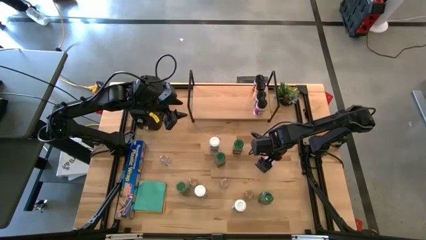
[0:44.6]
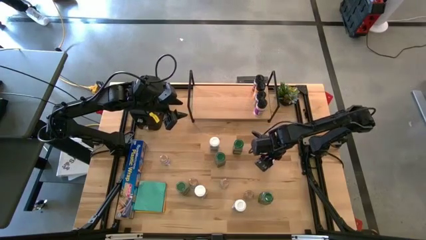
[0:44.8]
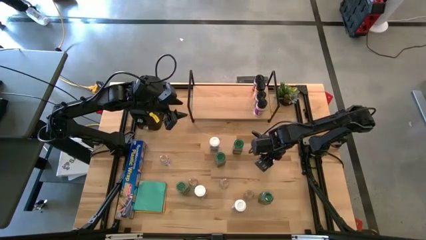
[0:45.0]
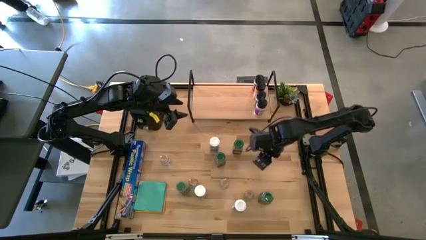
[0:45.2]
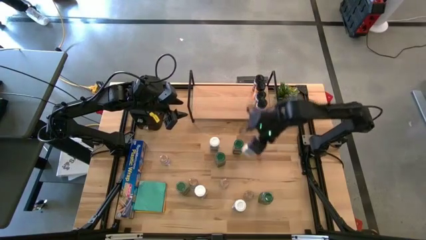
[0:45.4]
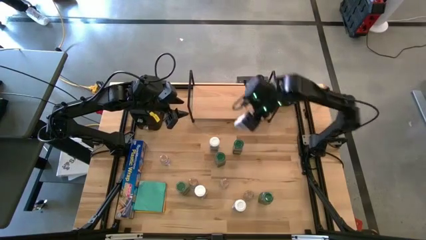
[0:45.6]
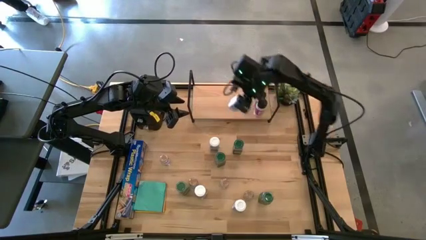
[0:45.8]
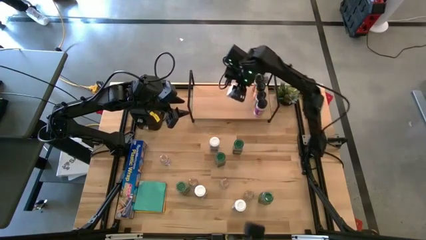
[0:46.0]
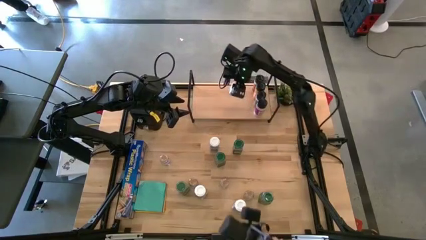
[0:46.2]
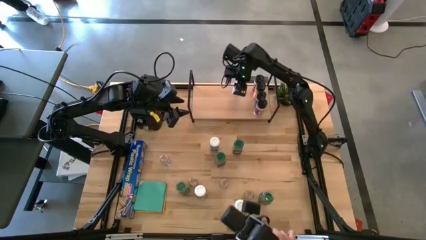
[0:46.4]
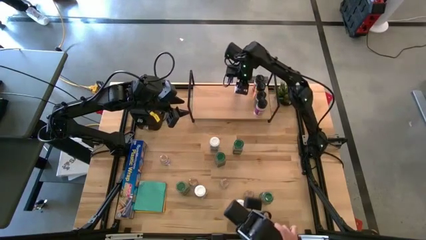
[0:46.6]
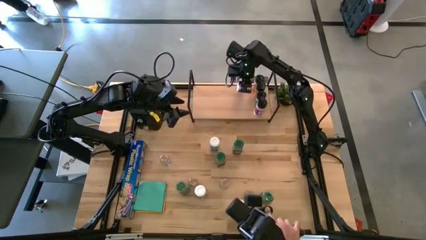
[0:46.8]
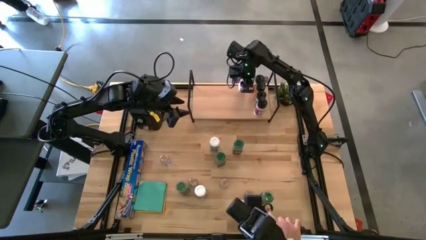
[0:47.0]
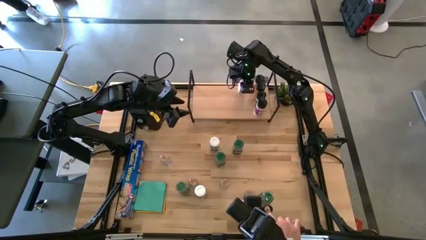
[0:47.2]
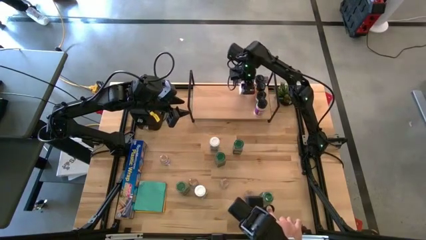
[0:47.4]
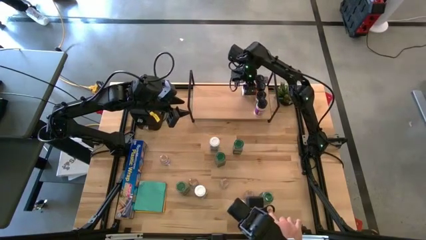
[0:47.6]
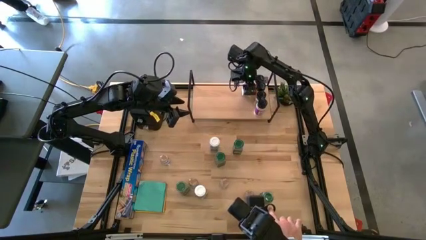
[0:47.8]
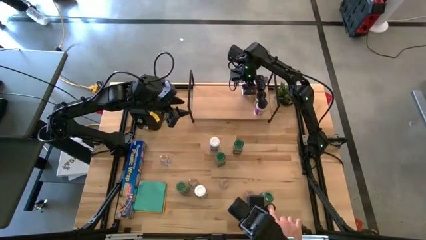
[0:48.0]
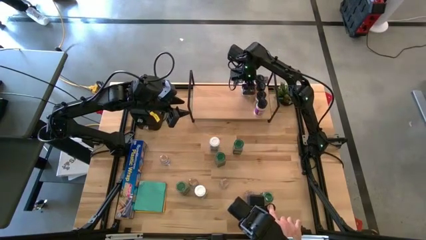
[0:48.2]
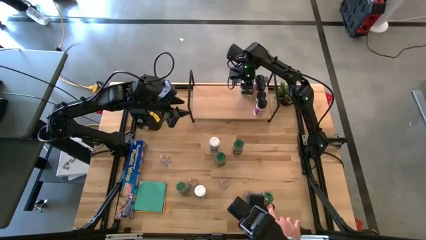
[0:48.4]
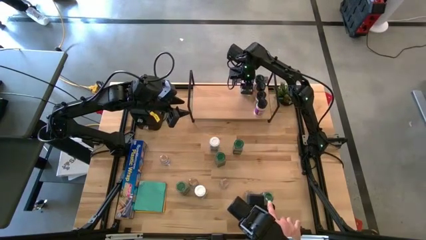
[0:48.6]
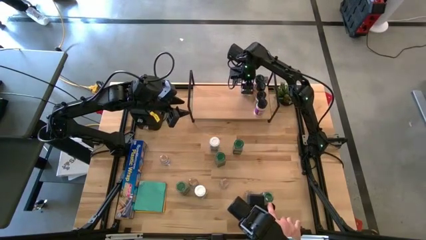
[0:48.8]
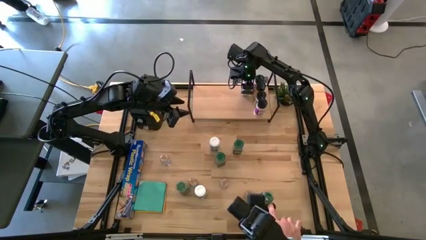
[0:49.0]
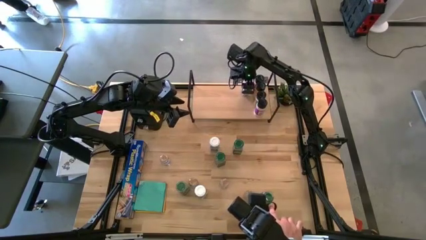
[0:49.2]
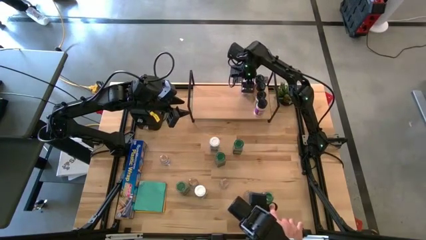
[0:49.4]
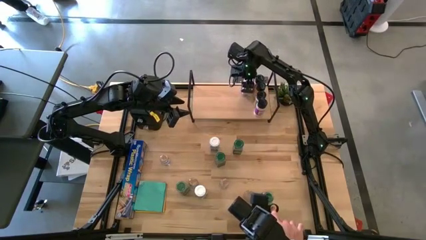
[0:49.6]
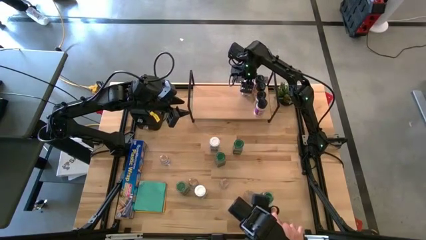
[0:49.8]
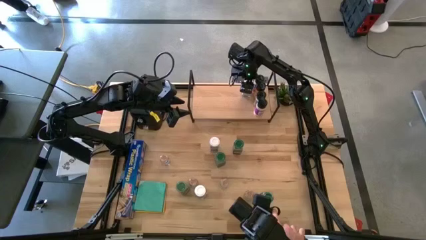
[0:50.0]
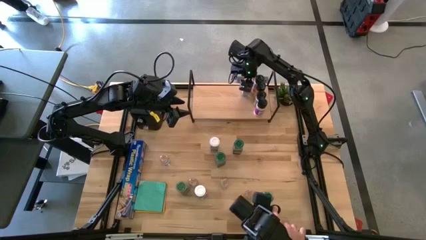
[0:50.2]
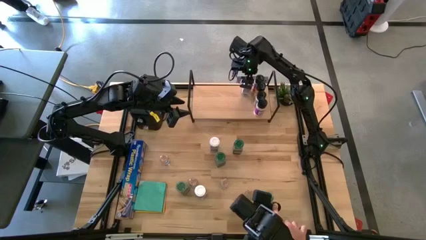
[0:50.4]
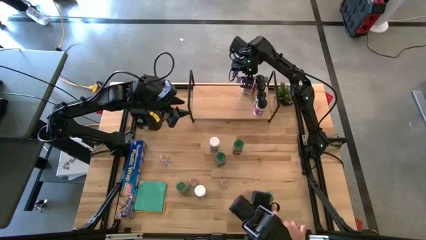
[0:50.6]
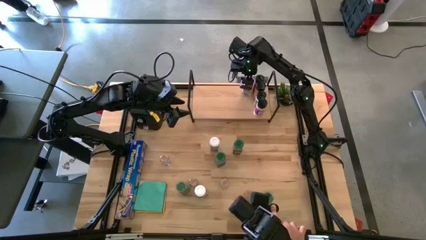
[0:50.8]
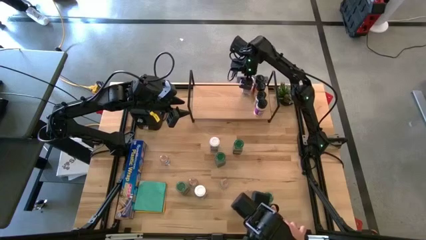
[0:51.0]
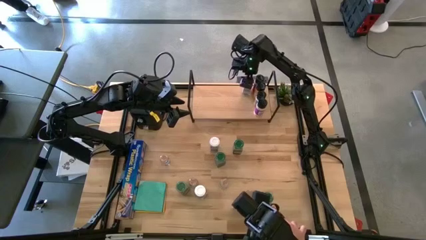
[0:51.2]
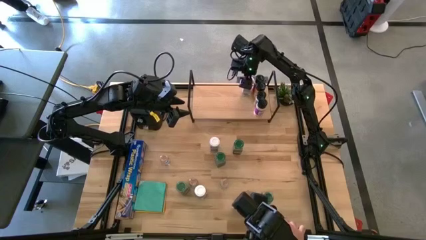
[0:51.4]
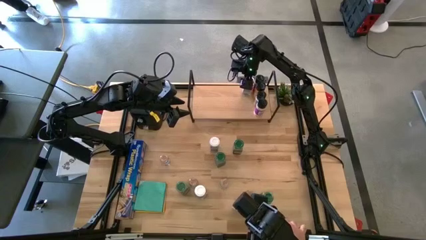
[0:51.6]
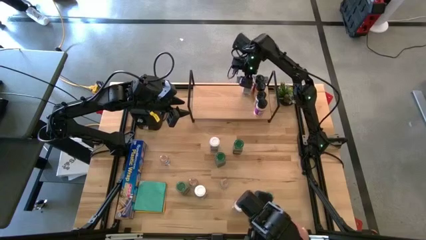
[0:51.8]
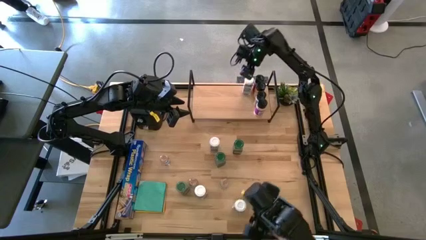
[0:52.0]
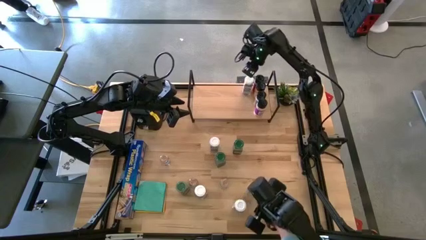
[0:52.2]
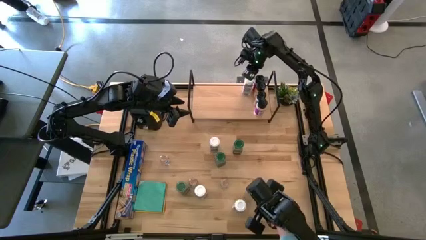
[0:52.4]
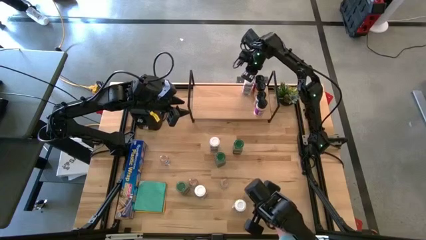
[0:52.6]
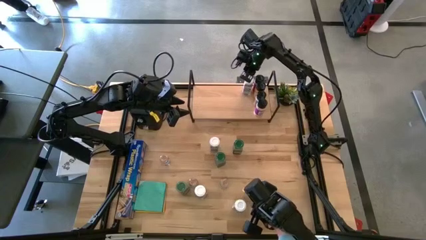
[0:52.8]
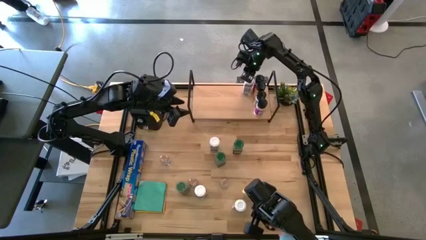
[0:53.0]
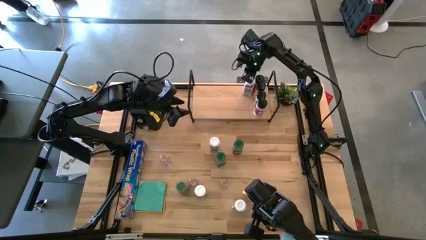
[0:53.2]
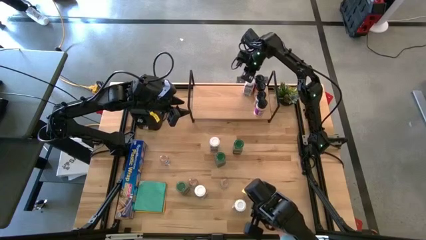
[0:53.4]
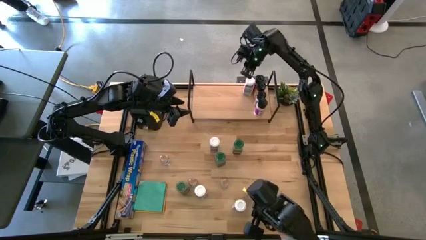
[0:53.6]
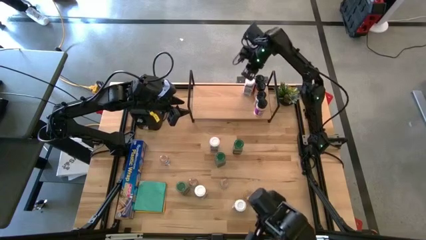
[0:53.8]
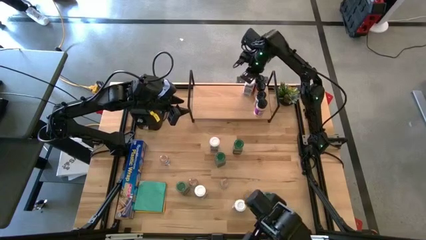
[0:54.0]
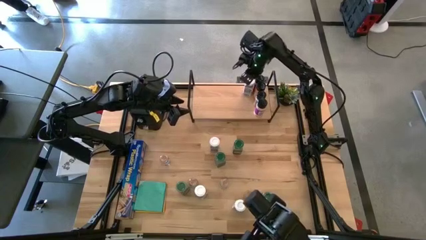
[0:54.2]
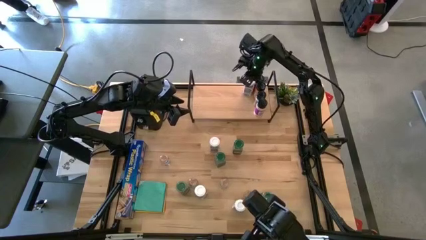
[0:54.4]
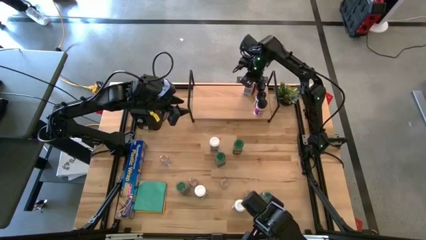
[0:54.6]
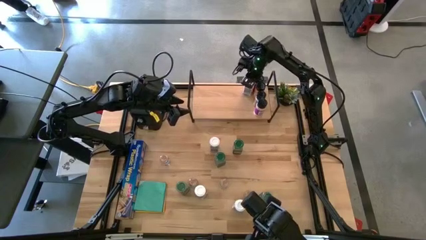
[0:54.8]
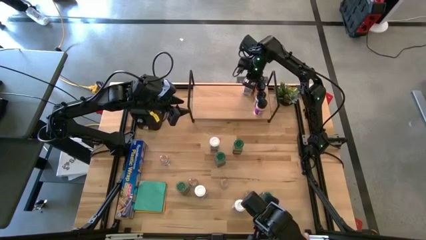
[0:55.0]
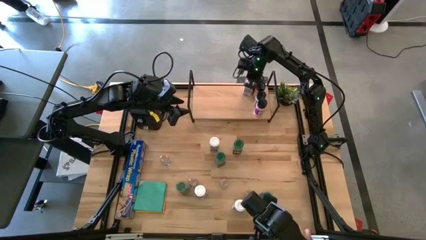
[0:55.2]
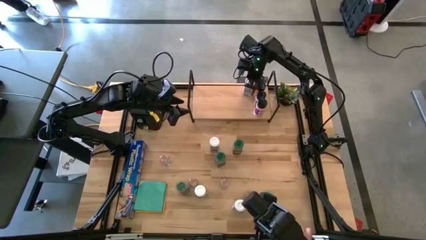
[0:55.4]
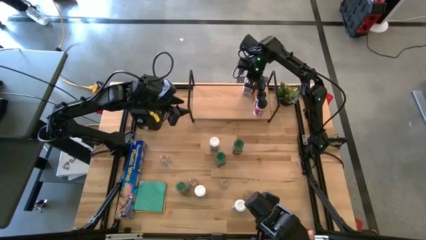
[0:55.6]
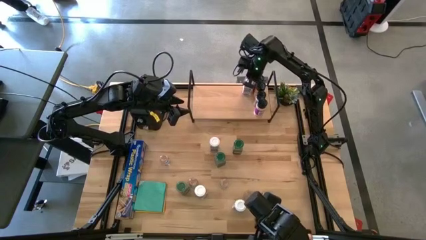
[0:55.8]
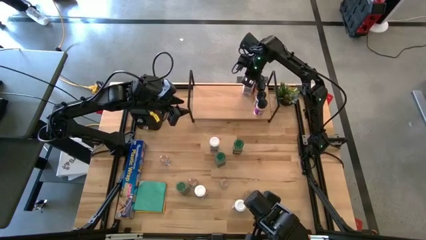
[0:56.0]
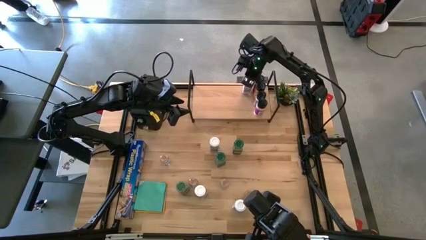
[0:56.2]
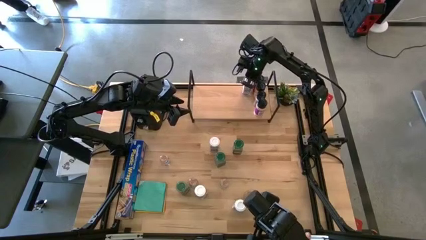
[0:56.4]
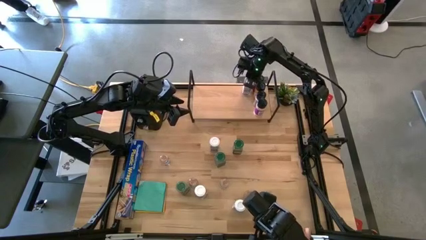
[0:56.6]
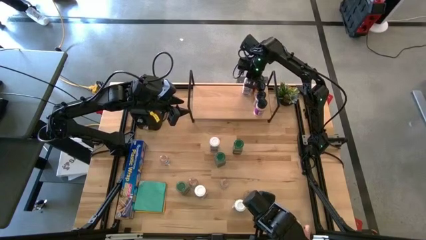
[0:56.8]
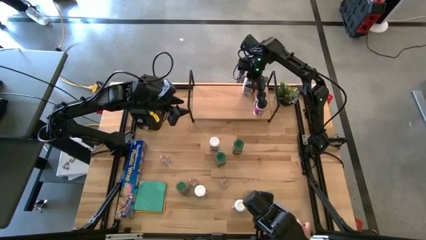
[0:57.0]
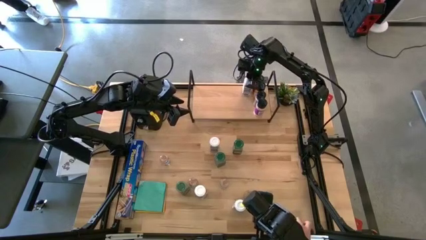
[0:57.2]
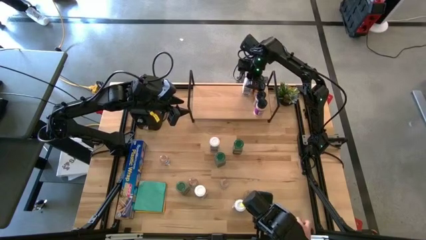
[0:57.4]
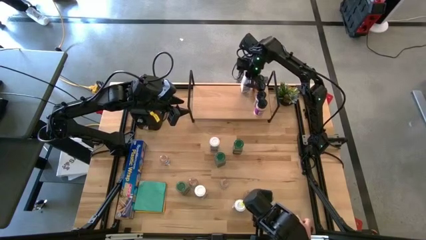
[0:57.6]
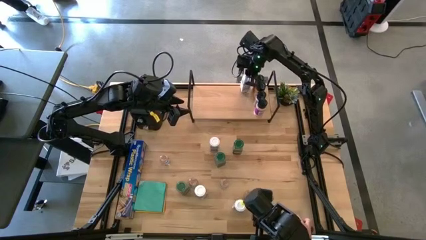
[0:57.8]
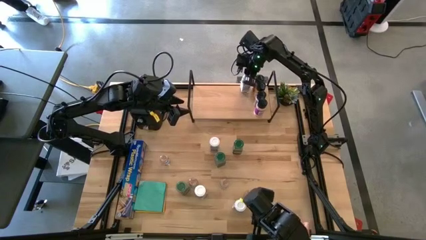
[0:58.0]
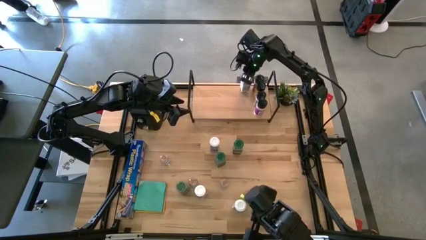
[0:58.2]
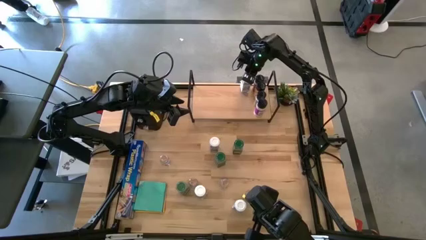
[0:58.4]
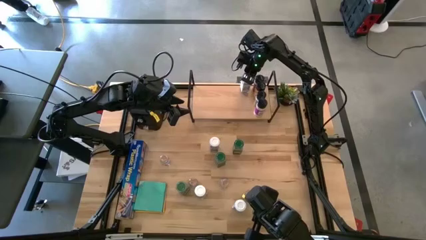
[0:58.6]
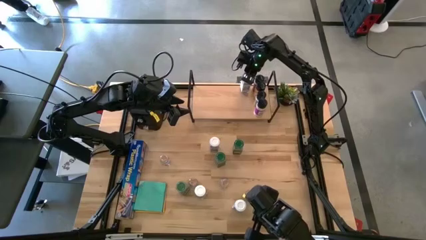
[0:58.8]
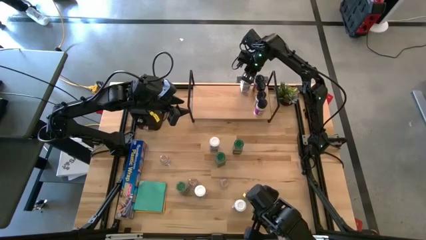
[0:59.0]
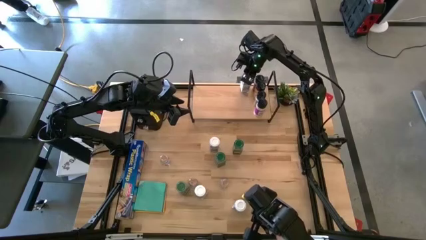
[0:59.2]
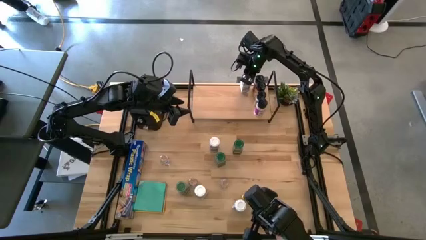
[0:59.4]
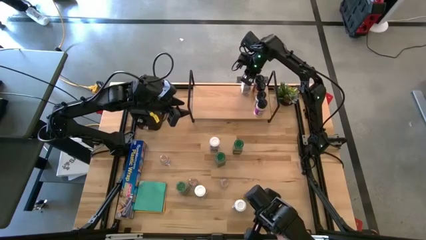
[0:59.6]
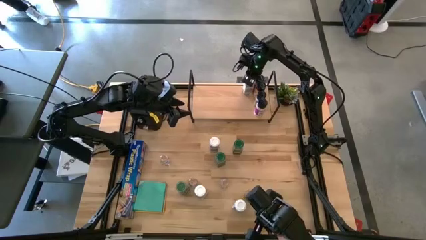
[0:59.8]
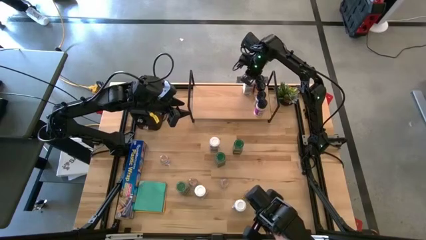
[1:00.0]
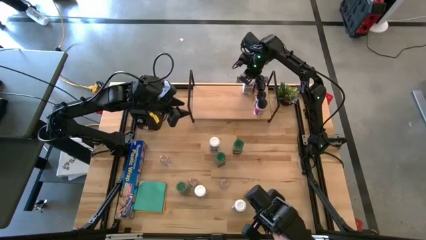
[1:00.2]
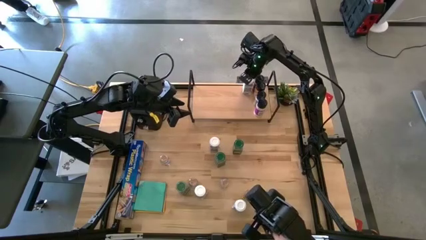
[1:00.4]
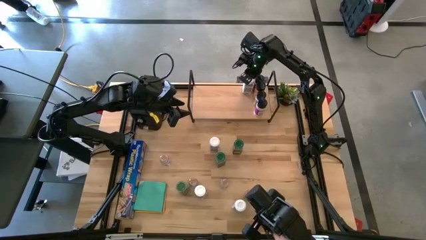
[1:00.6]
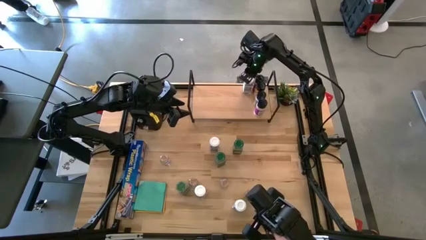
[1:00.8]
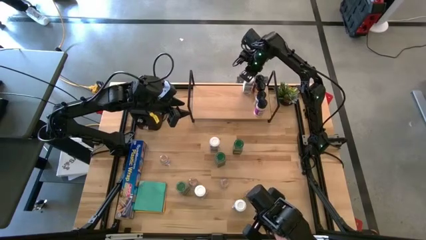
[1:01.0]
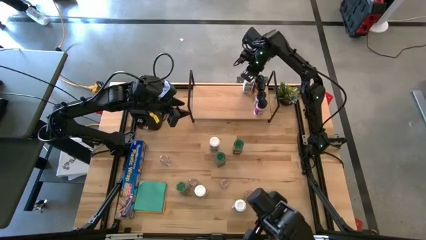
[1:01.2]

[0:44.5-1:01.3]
Task: Shelf spices
Put the top right white spice bottle on the shelf
